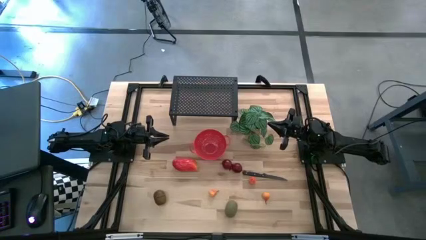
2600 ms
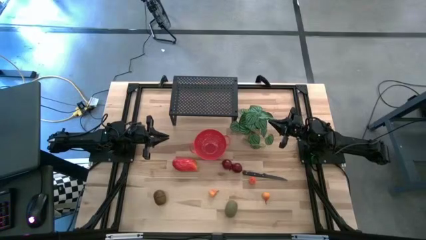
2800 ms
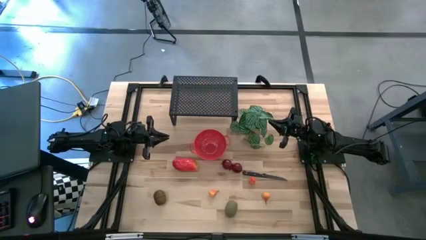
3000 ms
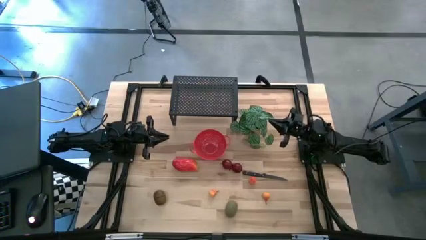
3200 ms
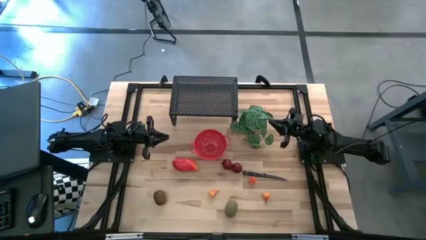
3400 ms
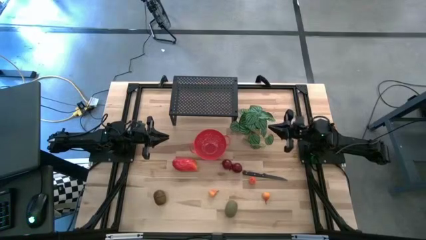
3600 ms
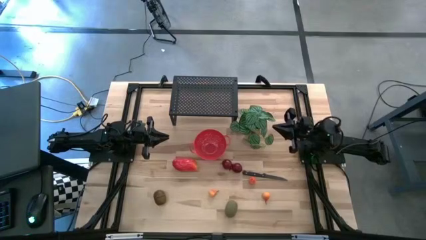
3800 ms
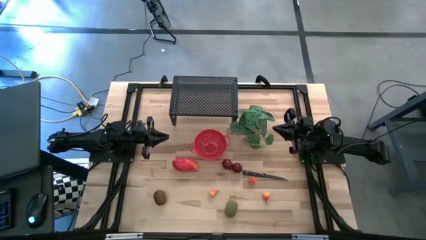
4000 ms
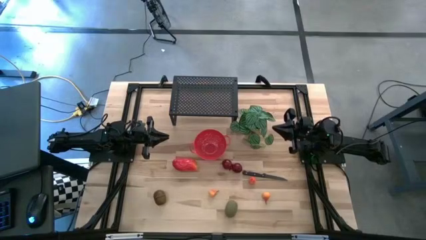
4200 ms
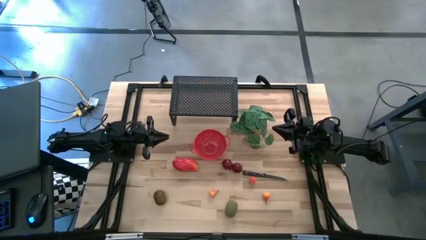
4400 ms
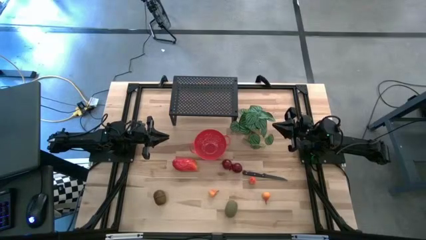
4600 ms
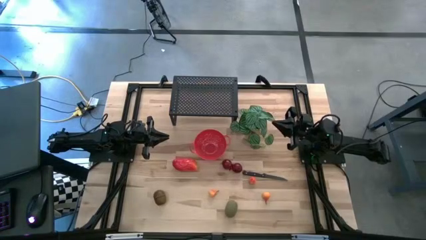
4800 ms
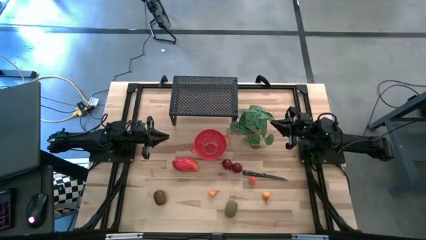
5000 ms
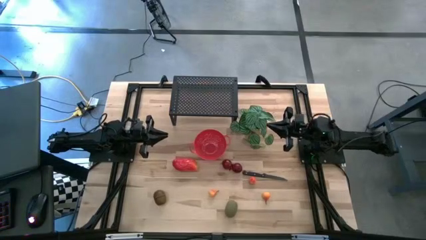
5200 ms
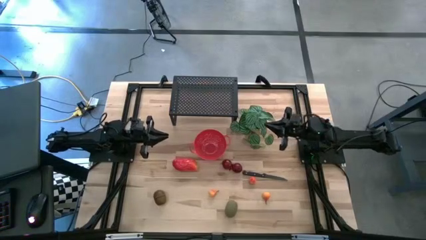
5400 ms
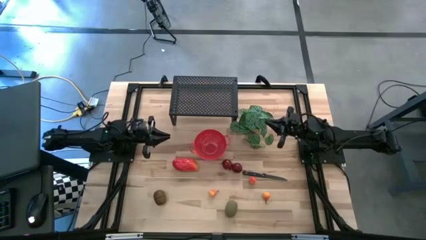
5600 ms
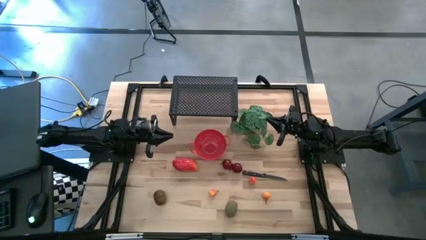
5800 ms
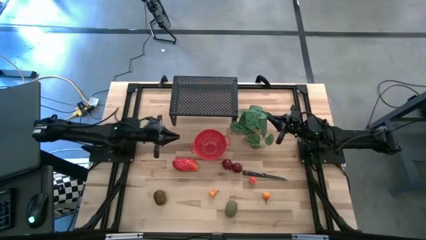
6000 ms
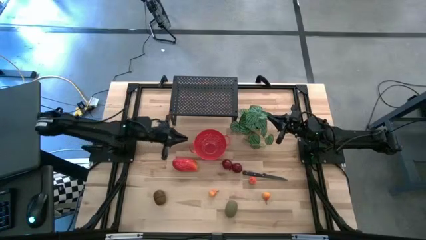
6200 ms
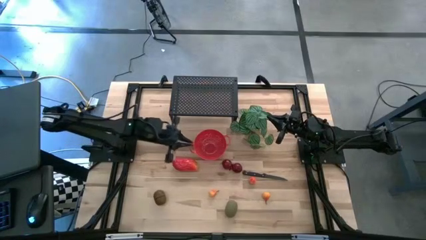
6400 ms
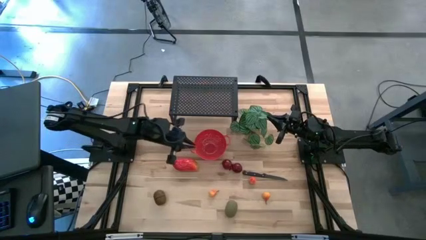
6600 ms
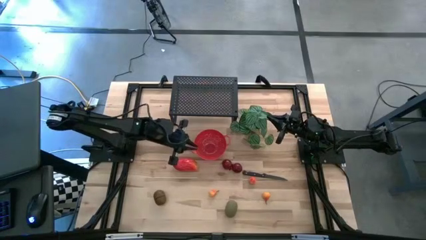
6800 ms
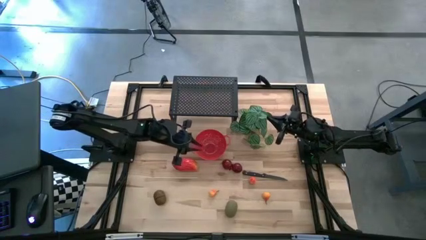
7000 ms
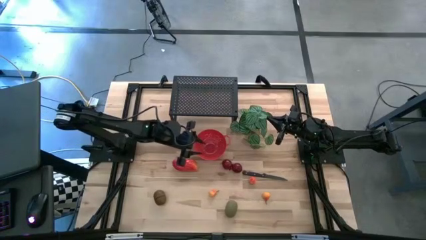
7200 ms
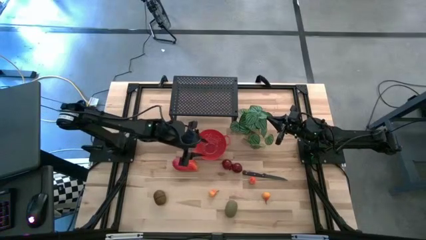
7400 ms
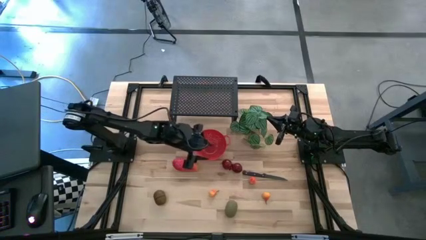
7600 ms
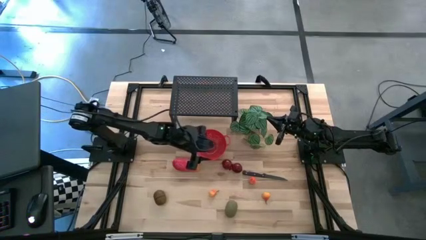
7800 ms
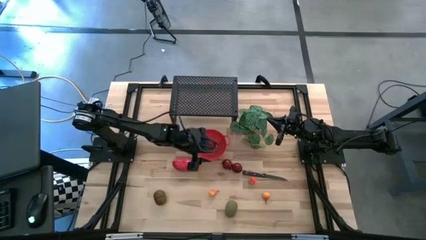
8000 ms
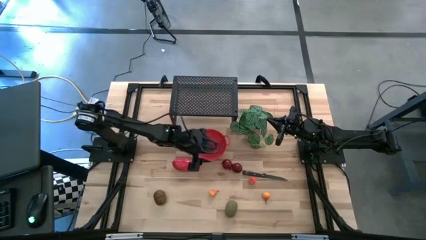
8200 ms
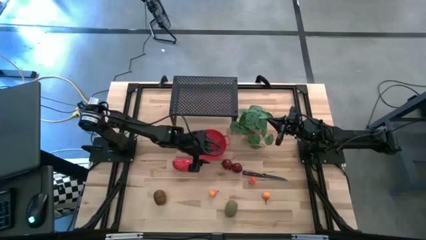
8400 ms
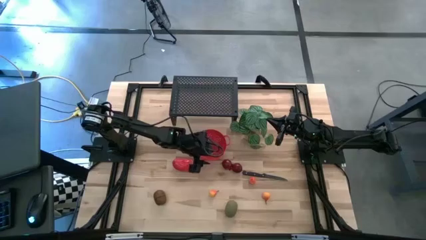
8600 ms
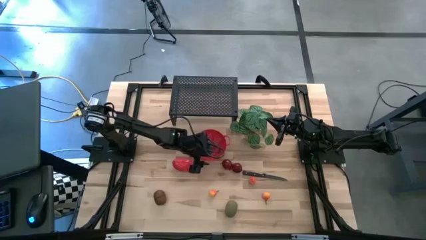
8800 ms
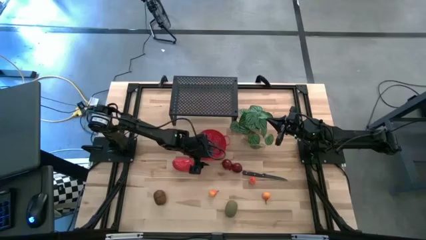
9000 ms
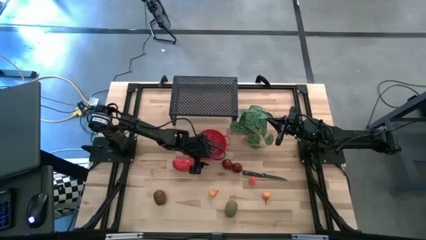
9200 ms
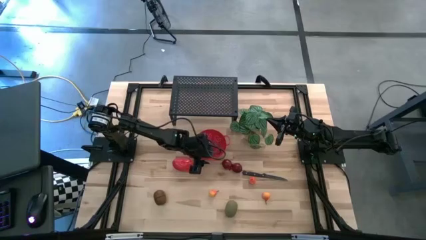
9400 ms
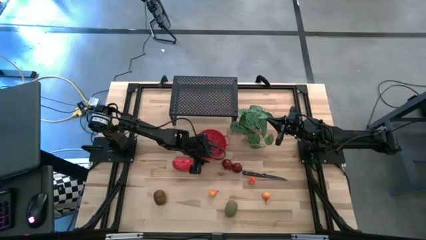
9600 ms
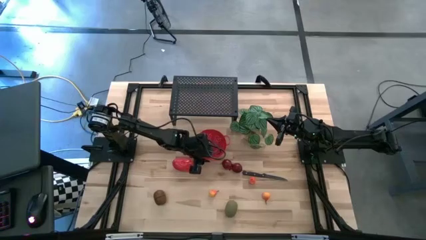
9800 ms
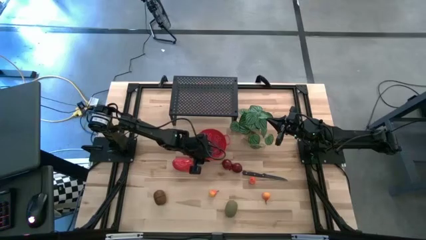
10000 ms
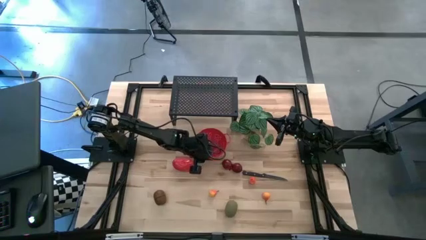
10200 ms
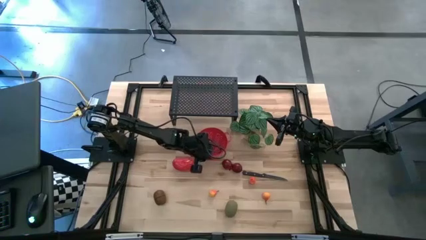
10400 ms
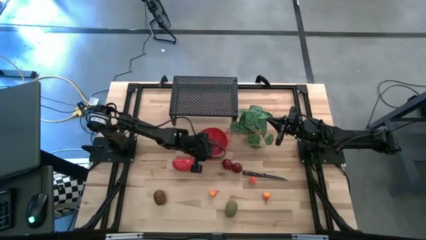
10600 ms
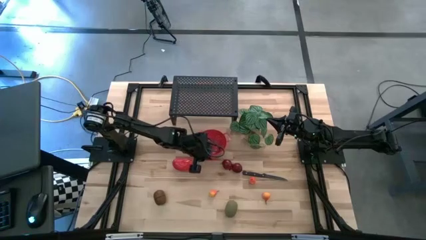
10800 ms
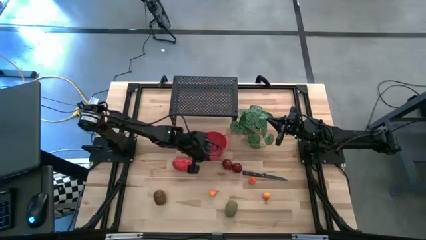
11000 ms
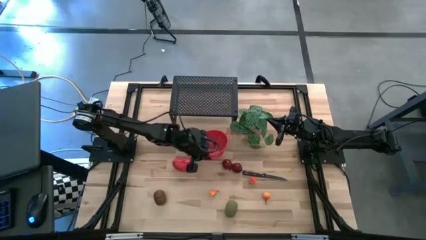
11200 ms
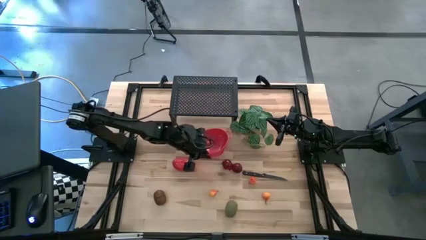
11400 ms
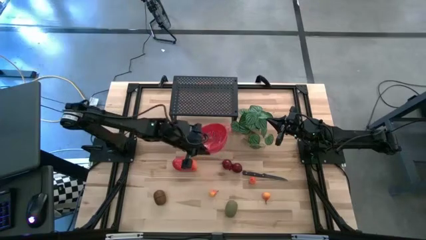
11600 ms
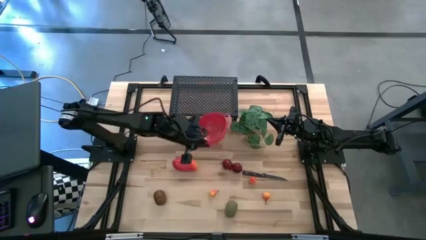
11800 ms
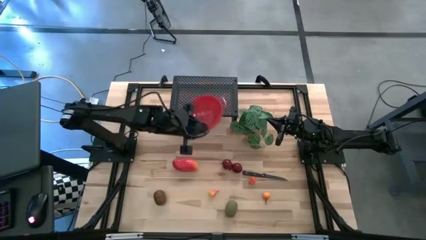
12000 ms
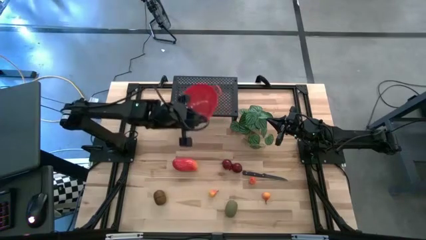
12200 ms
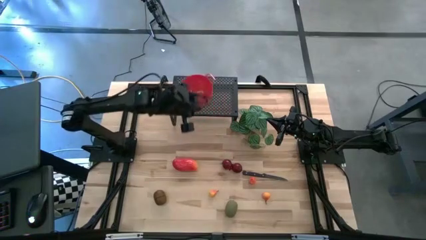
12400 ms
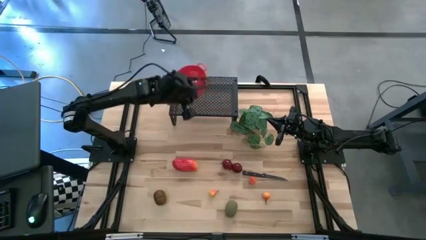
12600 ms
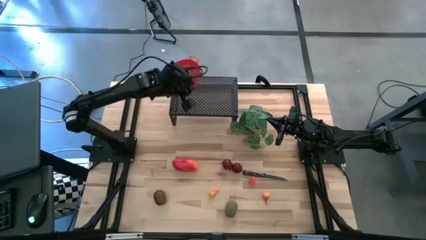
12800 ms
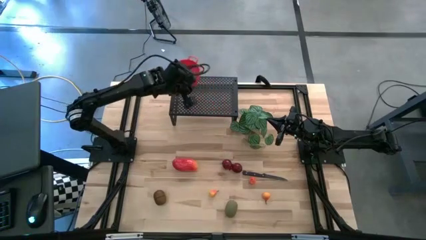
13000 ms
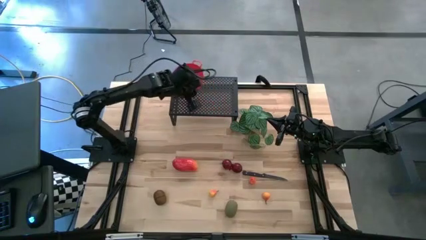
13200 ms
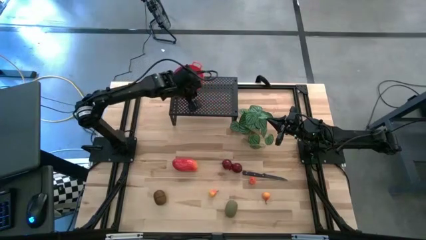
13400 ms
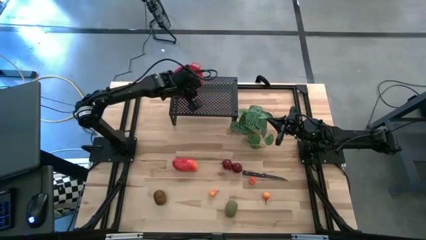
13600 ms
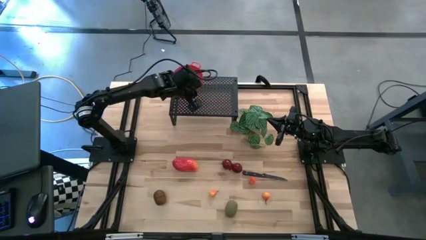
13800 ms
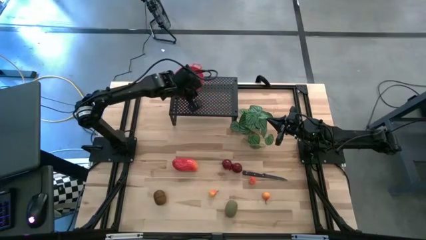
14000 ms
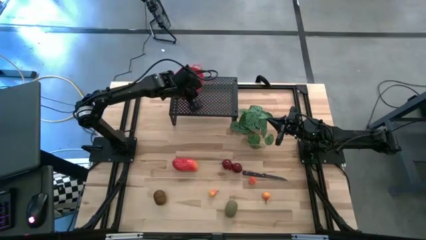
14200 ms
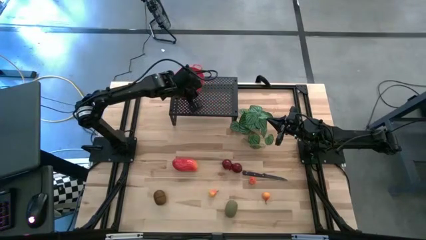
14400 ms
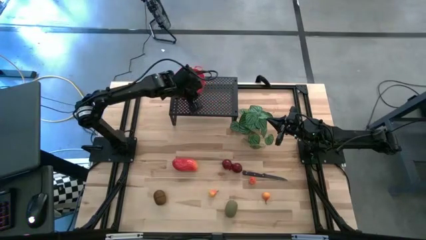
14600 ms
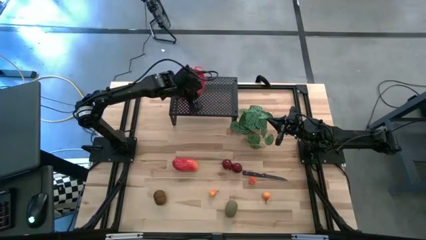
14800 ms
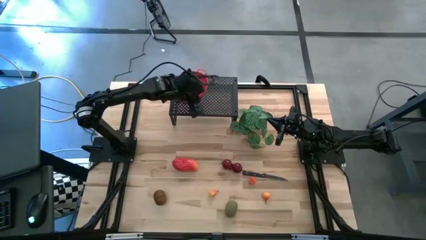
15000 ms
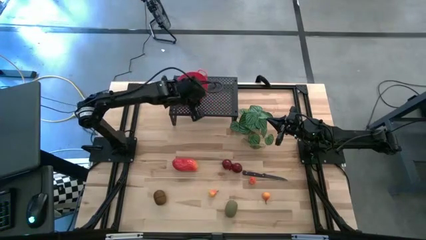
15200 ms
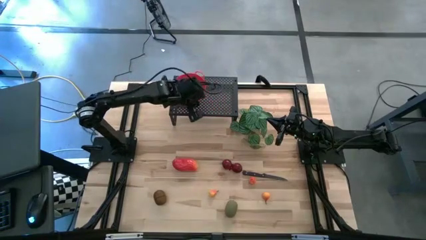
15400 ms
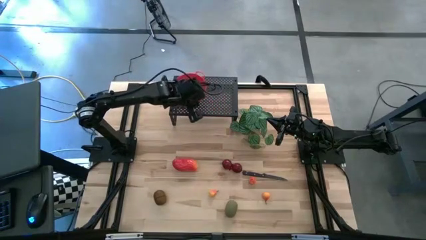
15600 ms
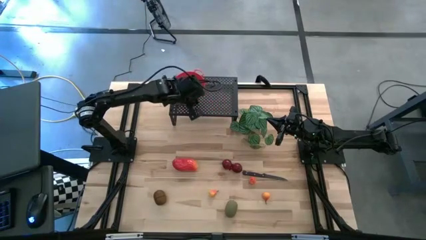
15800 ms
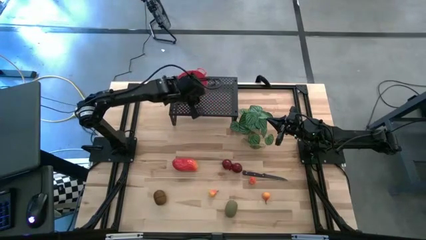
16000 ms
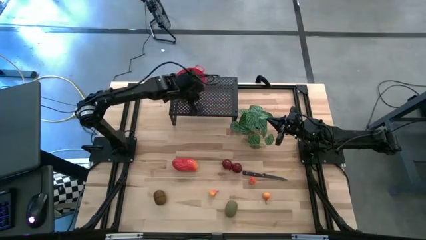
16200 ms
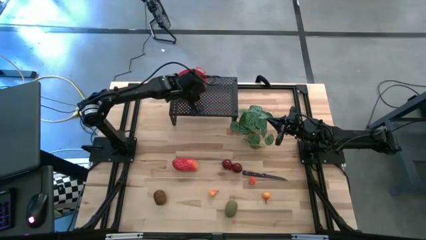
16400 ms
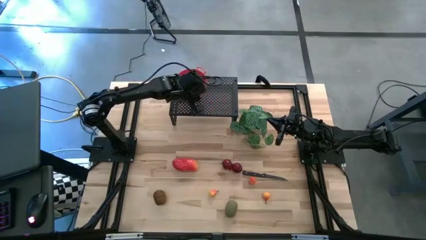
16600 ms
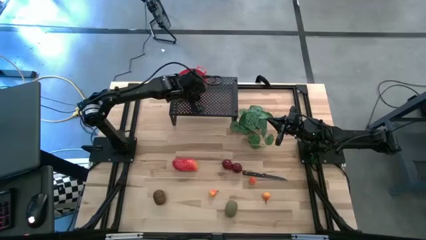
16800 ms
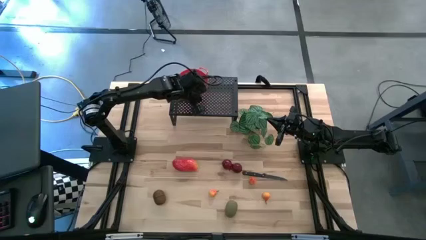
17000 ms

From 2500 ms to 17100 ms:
Task: Pick & Place Fruit
Put the red strainer bowl on the shelf
